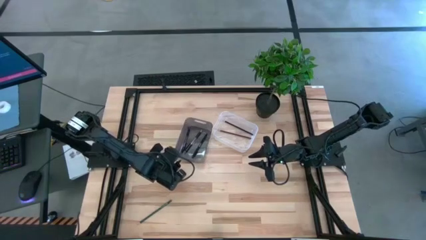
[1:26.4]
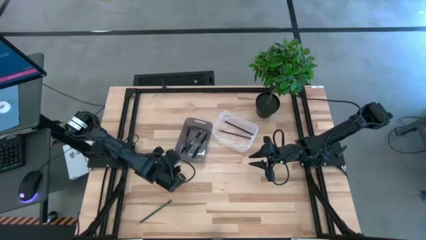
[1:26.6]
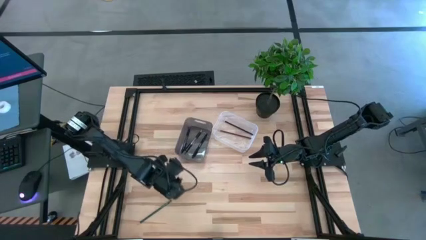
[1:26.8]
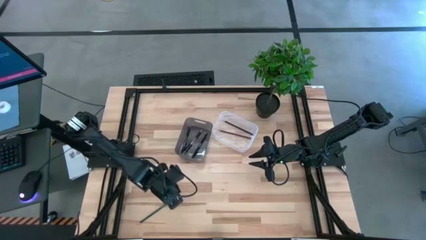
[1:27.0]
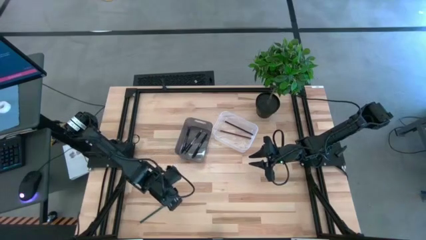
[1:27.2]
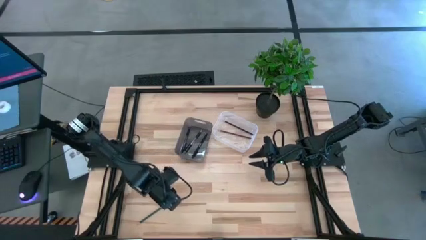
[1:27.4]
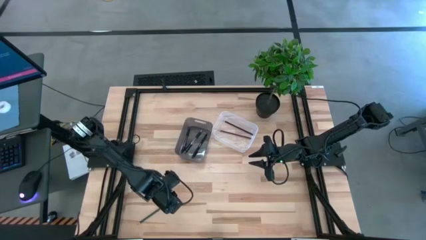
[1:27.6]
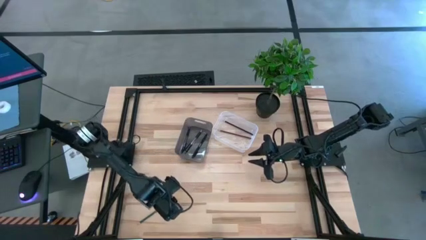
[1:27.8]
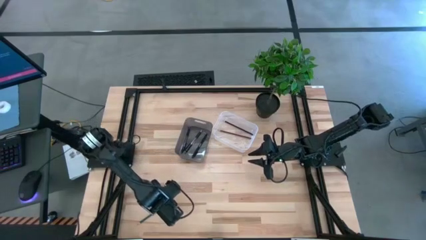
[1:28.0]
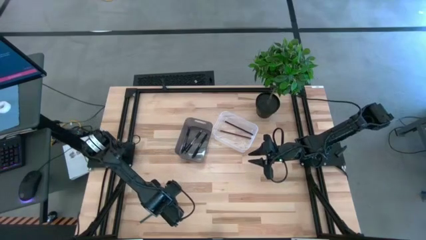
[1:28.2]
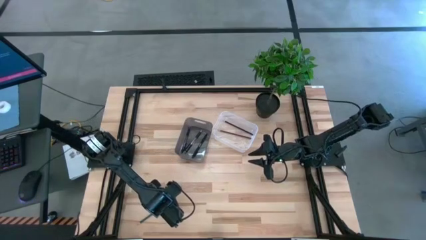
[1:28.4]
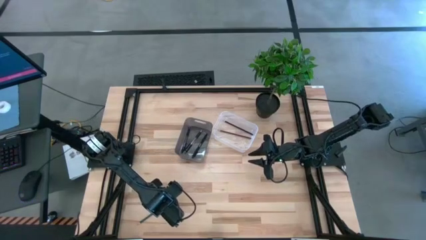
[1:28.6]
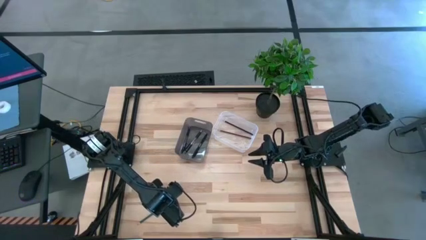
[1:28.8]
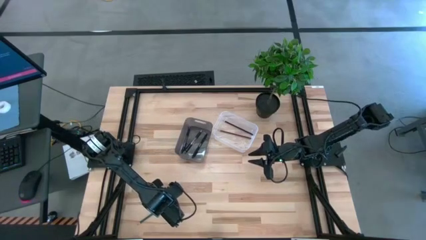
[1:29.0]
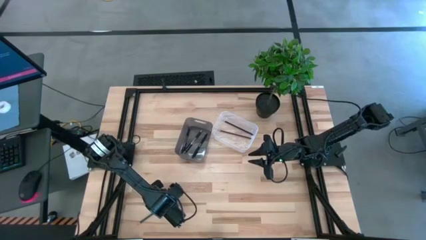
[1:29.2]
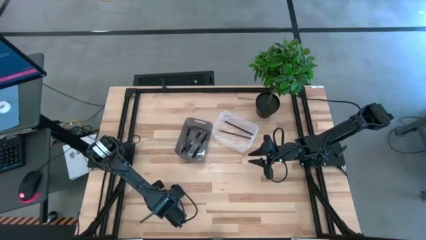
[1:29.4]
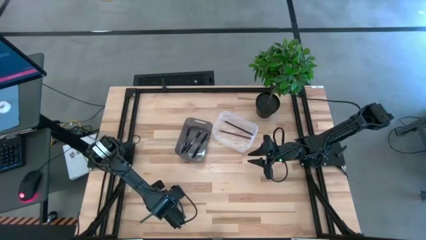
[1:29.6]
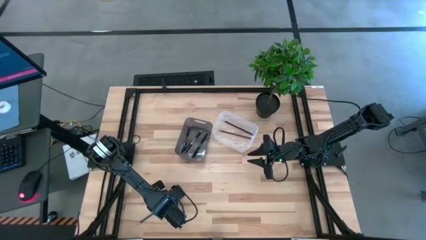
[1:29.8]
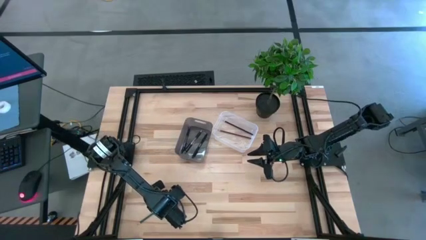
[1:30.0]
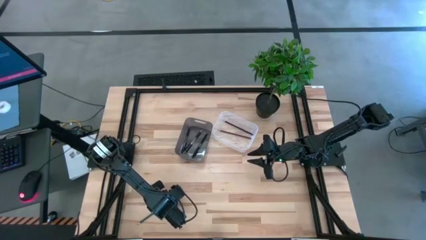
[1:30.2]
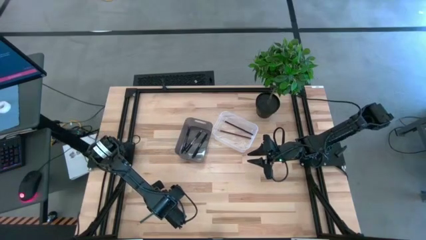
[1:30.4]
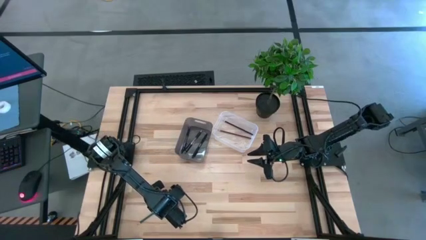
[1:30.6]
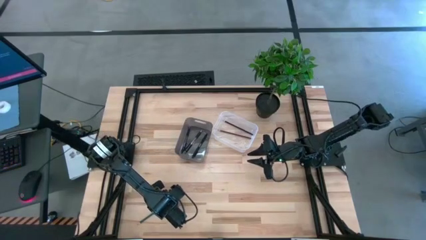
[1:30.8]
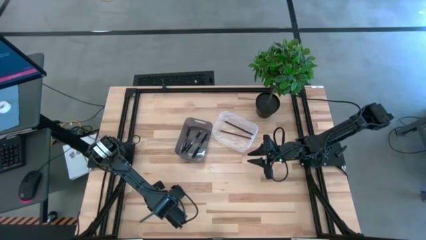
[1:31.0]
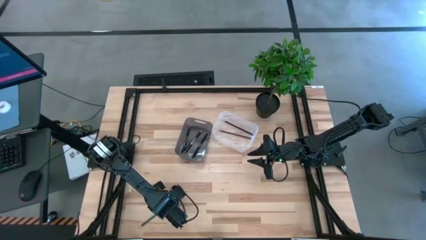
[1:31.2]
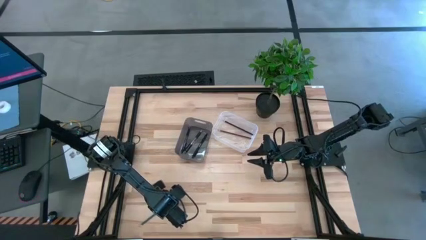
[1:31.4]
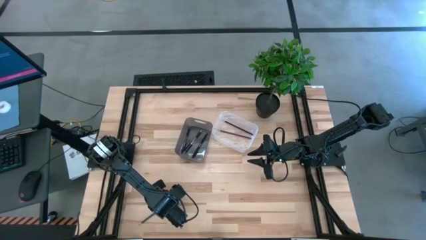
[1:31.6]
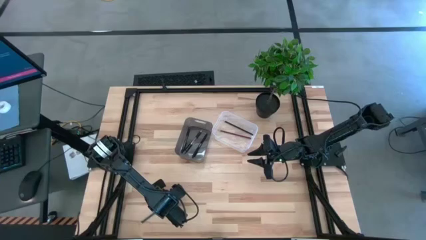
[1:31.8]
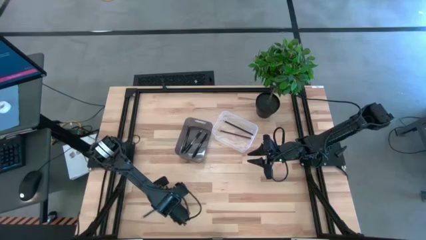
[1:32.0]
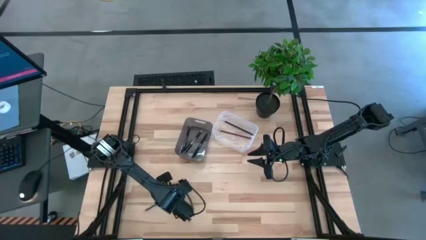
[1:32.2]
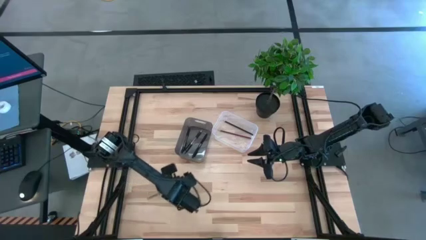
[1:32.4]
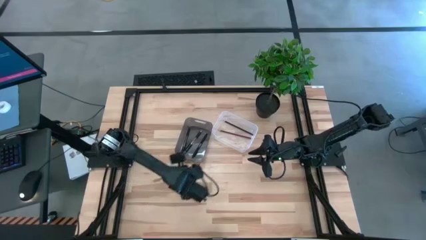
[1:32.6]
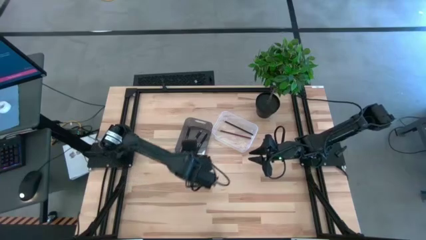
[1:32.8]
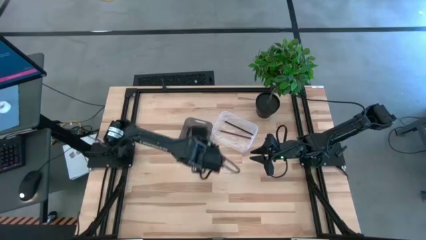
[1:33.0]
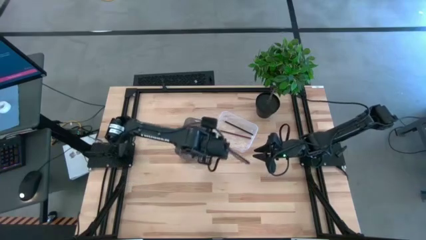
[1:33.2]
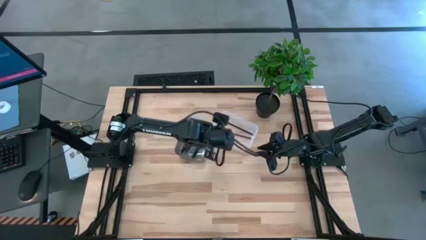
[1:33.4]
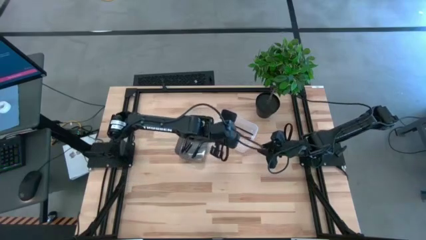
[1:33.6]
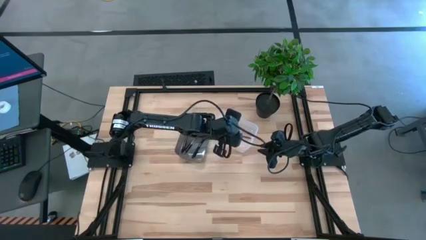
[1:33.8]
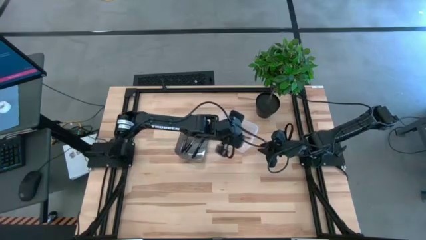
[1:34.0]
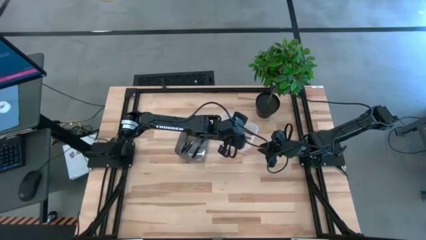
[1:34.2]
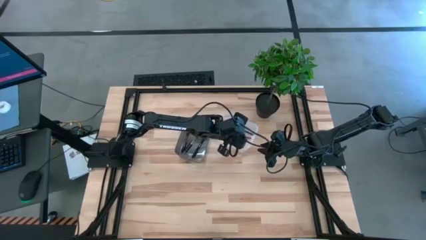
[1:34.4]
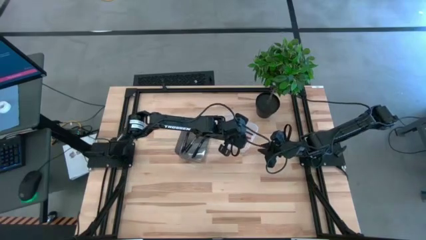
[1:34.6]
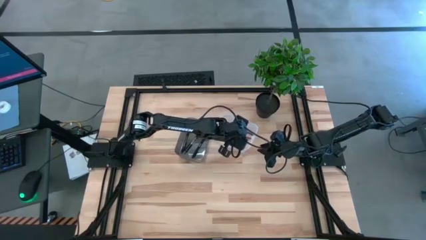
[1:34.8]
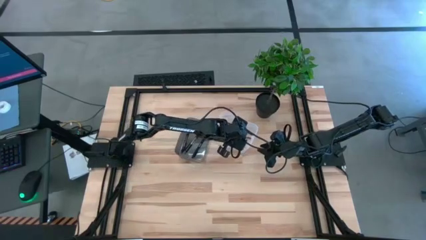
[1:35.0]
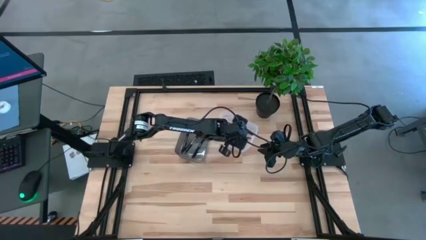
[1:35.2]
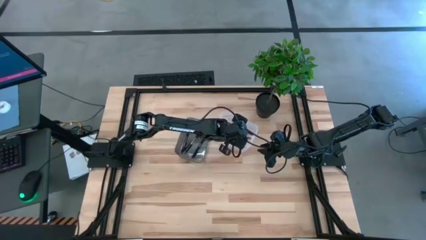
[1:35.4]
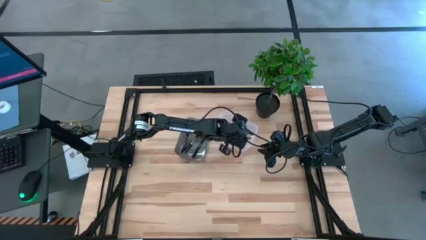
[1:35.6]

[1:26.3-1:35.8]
Task: Sort pens & pencils
Put the green colored pencil into the transparent bin

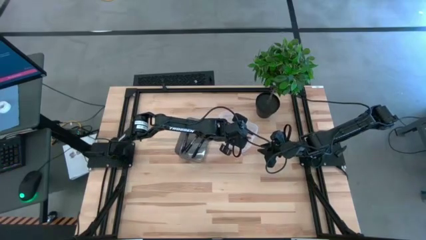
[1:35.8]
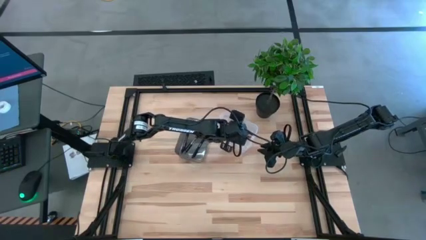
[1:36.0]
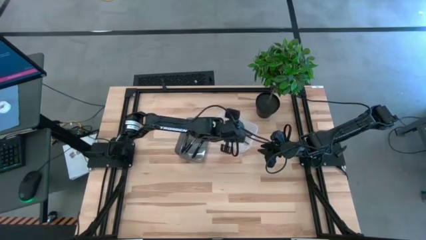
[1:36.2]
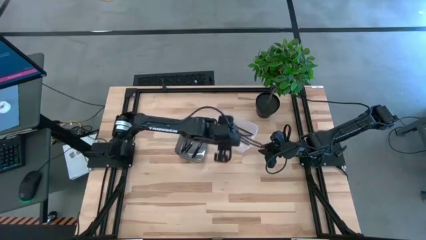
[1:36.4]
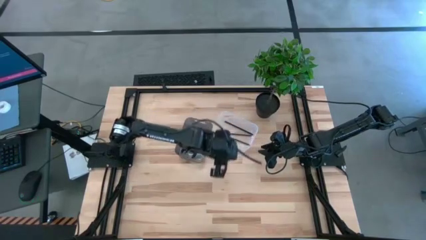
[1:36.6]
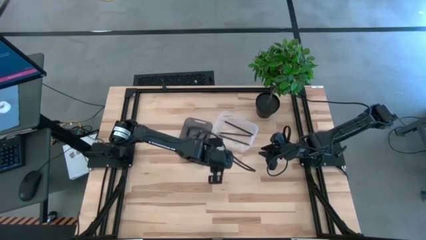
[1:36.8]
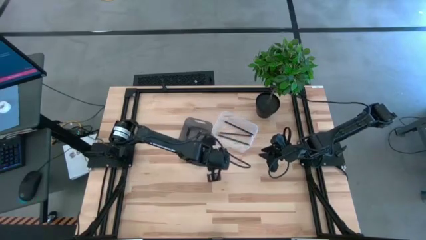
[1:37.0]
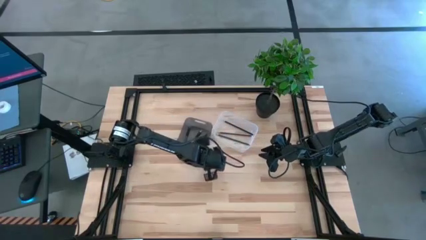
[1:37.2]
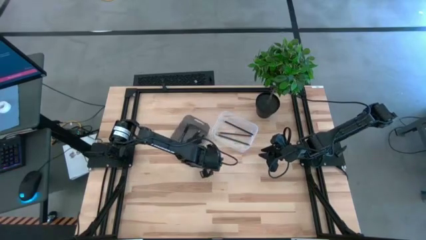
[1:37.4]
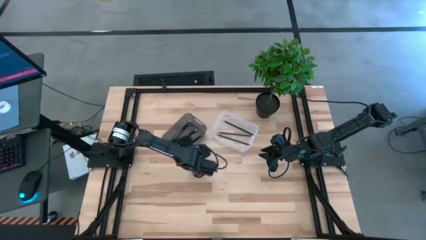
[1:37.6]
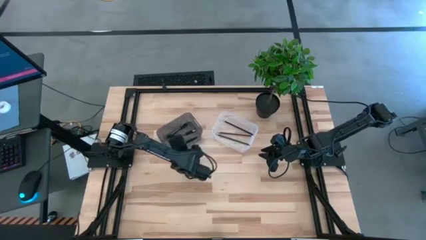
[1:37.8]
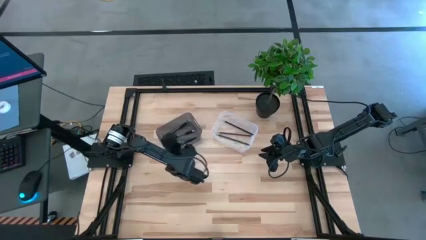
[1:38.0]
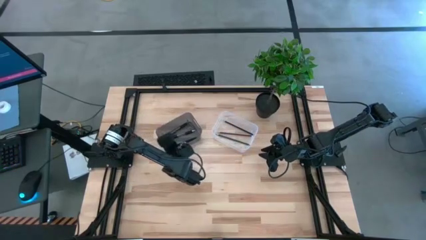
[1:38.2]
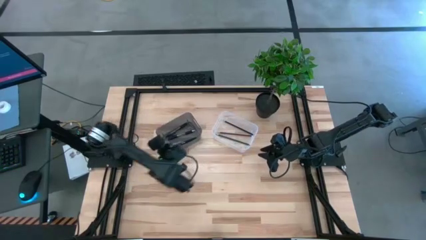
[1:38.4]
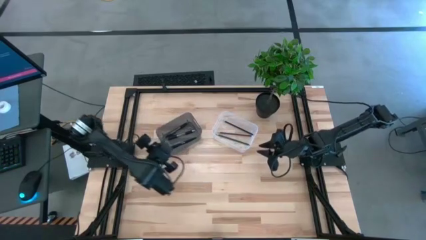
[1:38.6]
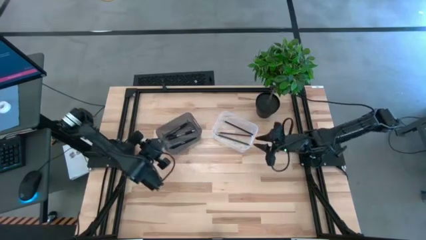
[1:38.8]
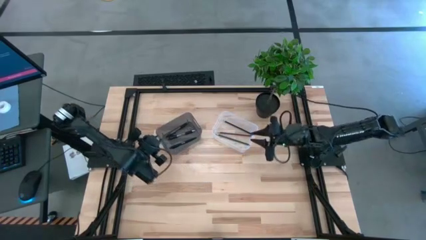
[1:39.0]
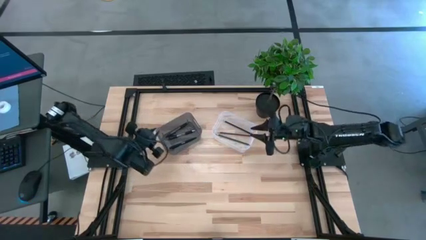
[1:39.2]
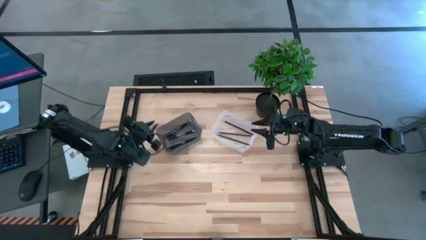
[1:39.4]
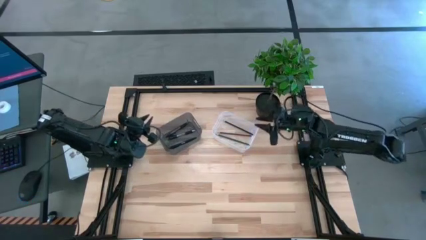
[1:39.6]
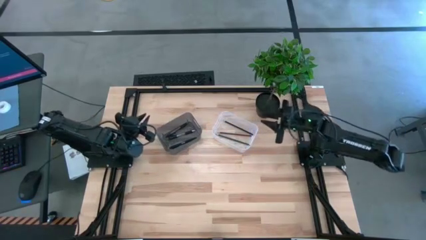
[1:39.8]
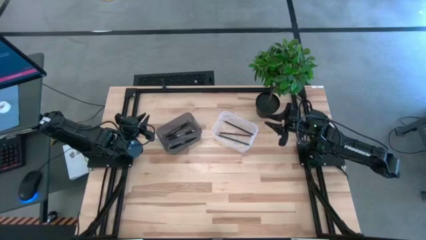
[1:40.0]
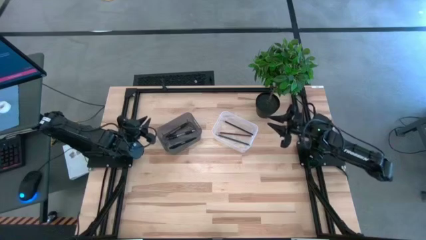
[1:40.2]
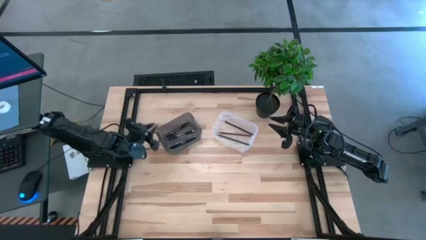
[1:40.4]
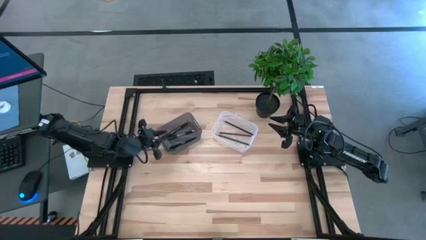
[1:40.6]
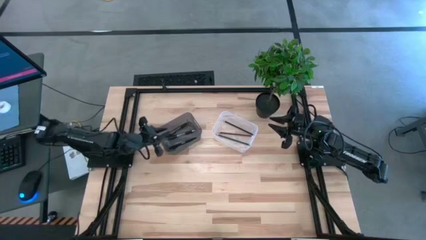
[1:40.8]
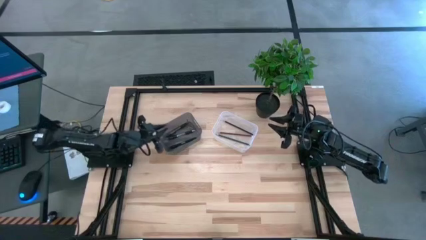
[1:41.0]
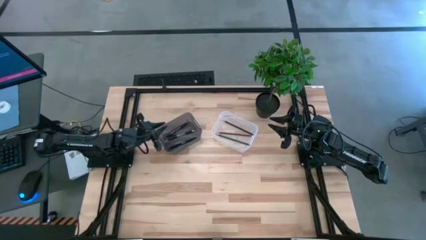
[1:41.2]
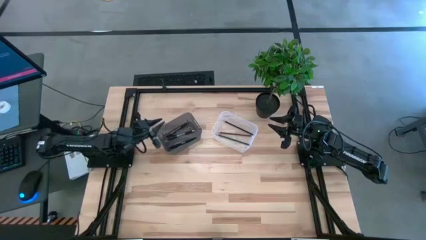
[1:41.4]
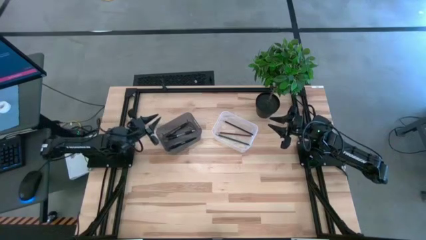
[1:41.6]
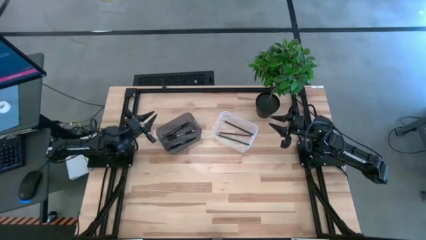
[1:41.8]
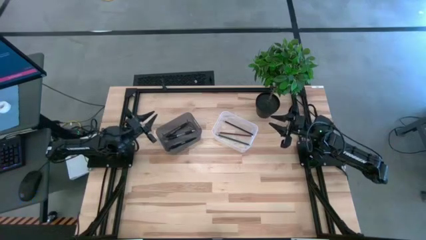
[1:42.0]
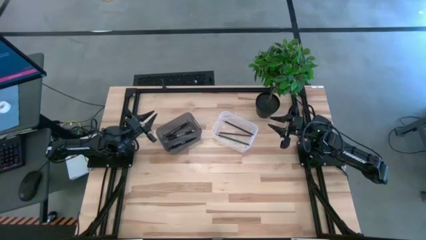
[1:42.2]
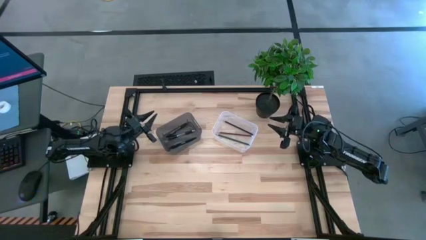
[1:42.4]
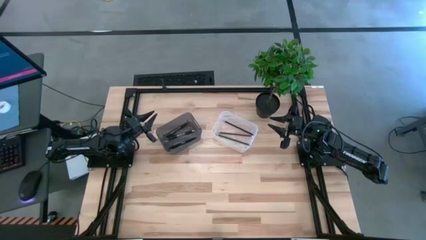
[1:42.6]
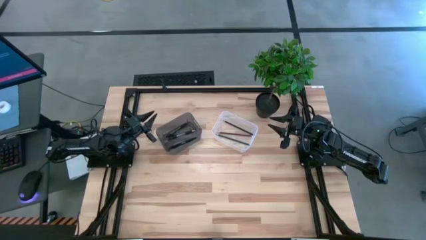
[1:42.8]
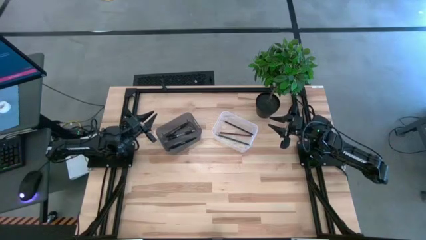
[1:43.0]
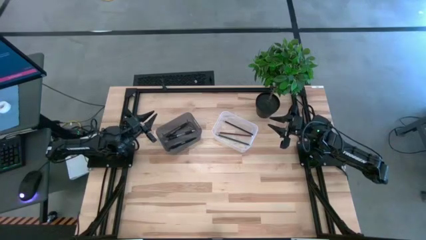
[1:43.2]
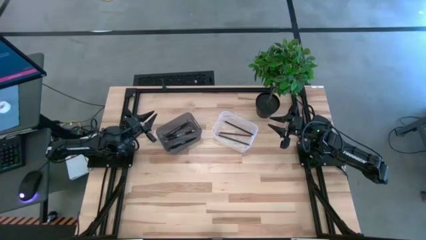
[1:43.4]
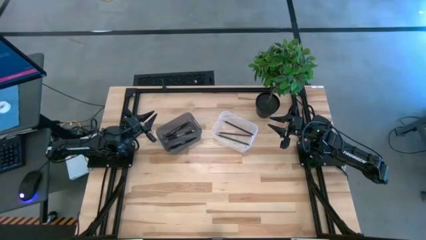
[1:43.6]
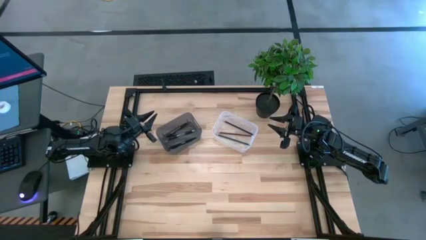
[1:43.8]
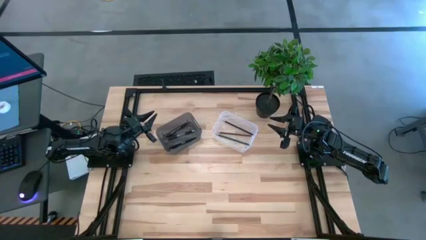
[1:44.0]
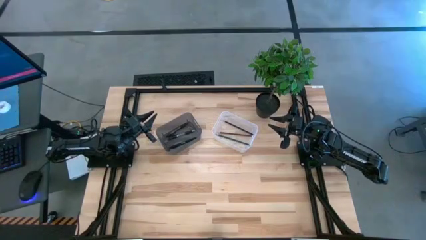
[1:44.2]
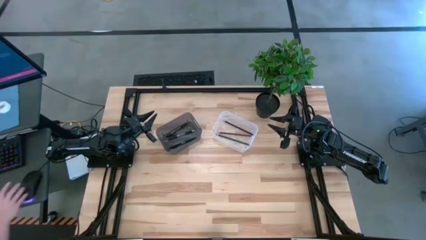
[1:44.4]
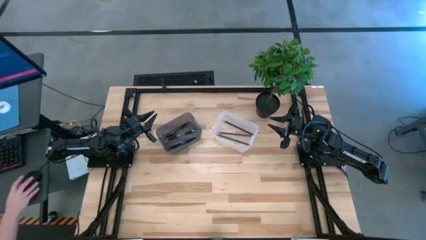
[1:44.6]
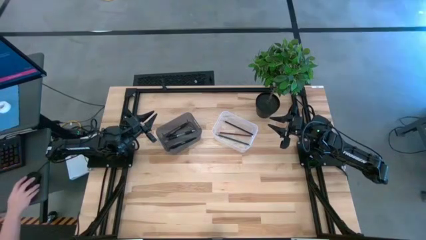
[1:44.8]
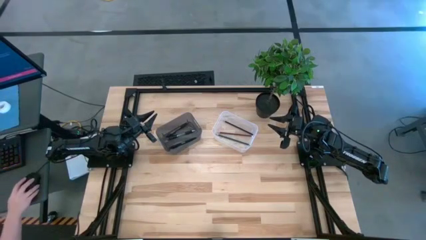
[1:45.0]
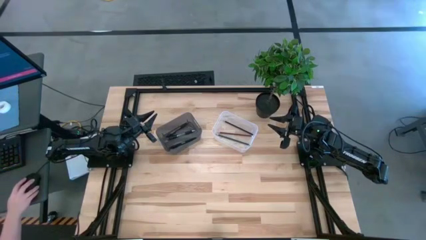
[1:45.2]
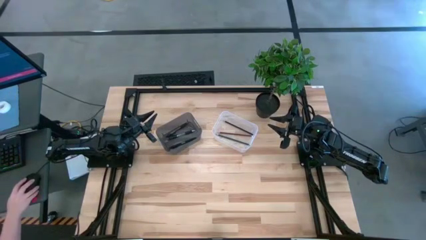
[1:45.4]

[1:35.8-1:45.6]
Return to Home Position
